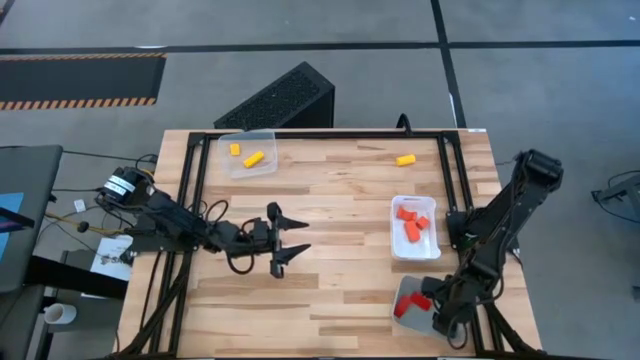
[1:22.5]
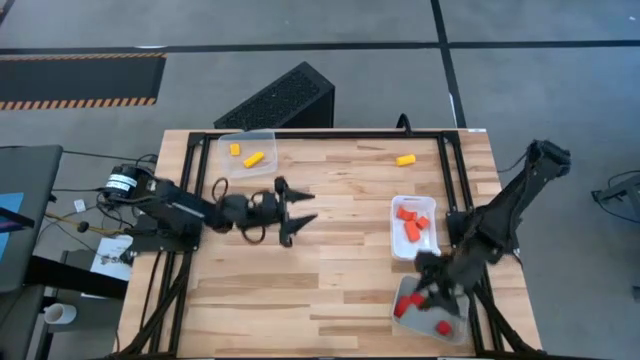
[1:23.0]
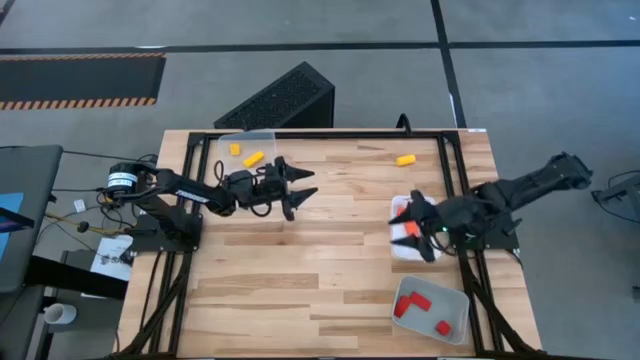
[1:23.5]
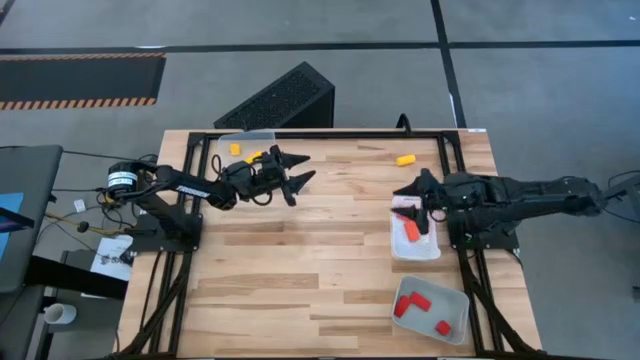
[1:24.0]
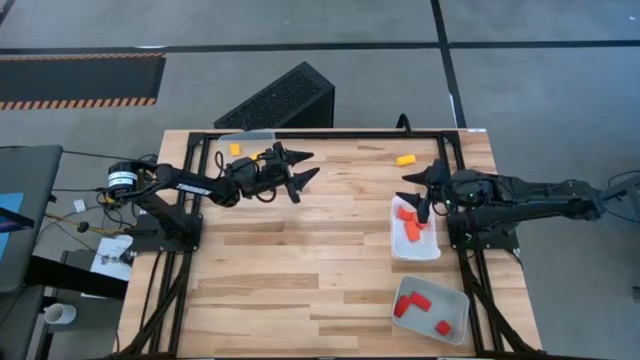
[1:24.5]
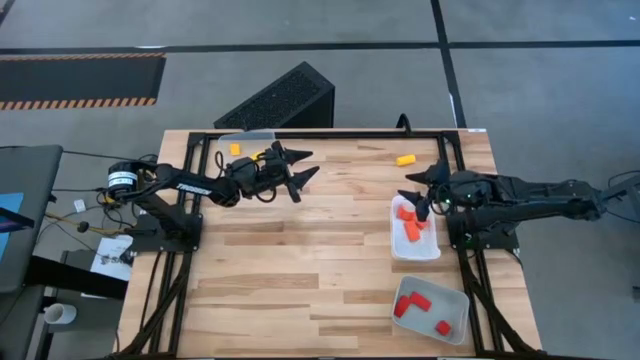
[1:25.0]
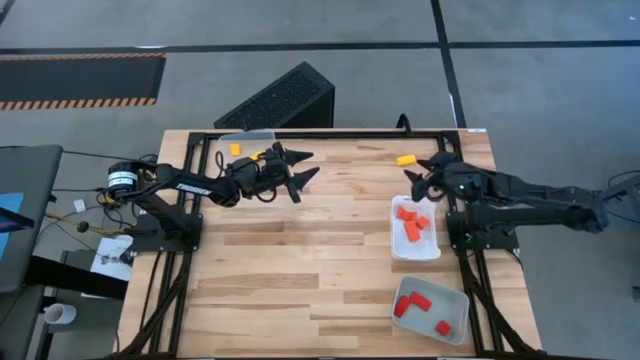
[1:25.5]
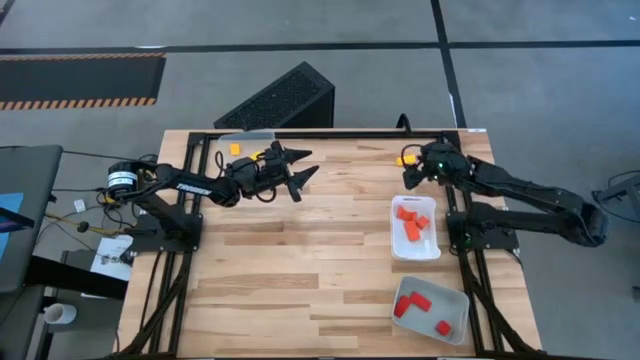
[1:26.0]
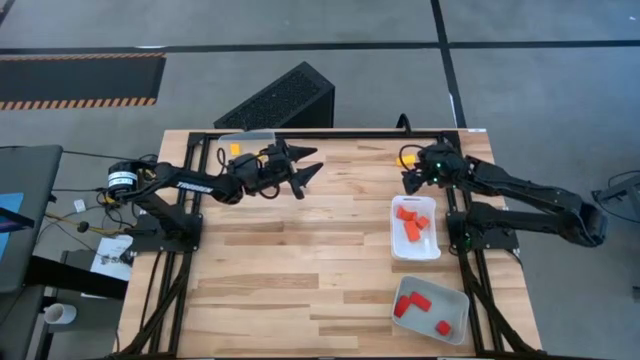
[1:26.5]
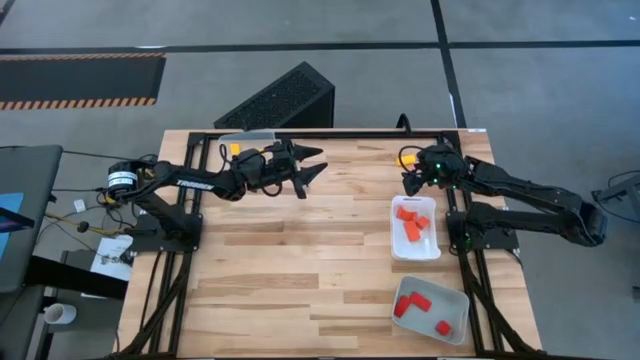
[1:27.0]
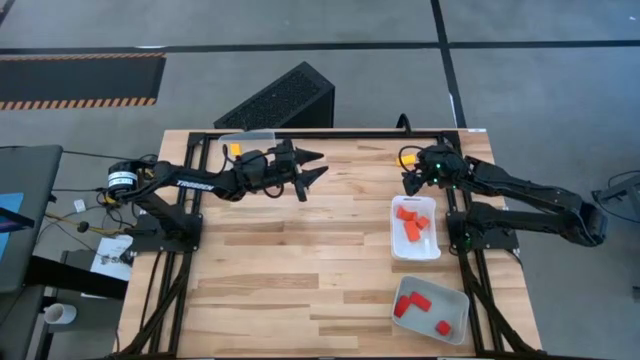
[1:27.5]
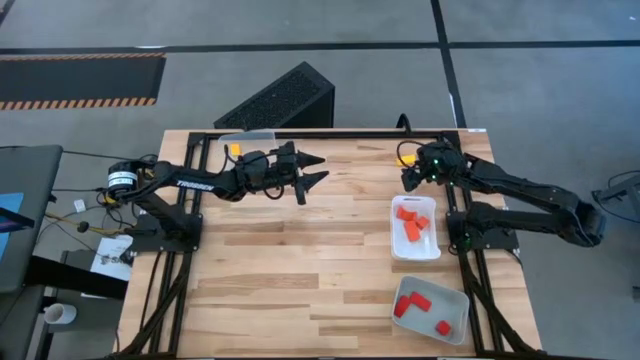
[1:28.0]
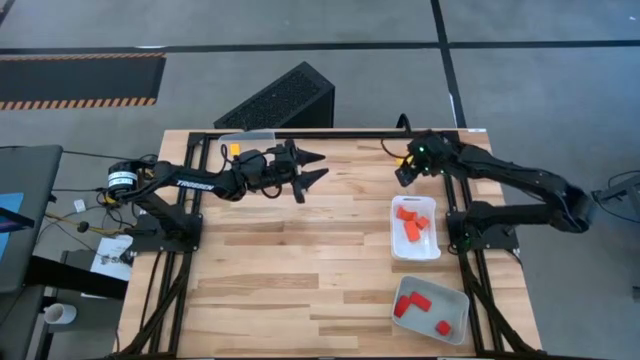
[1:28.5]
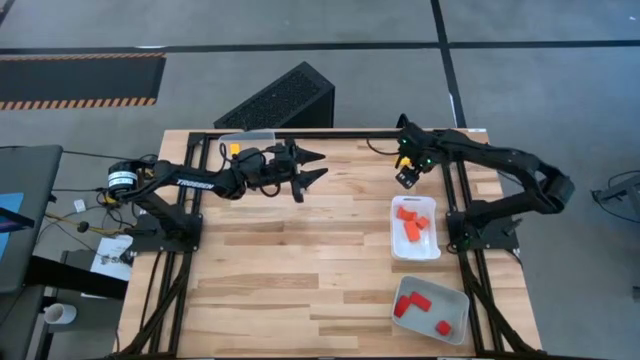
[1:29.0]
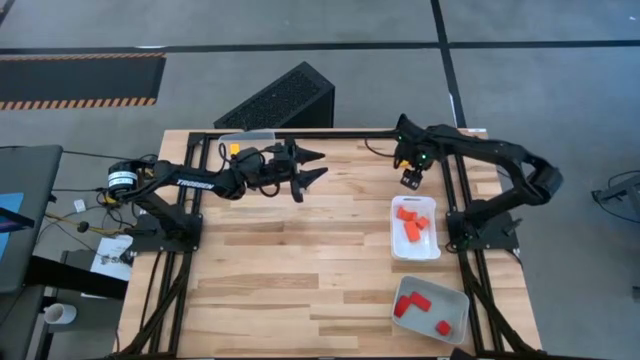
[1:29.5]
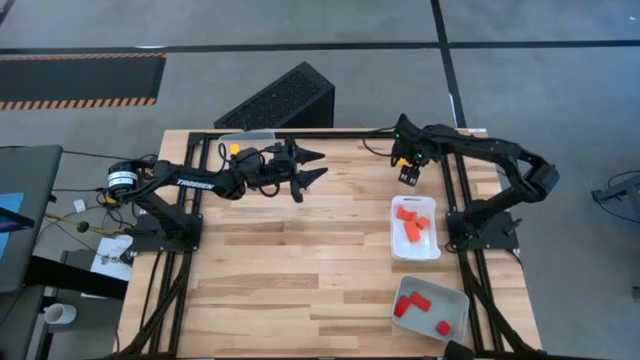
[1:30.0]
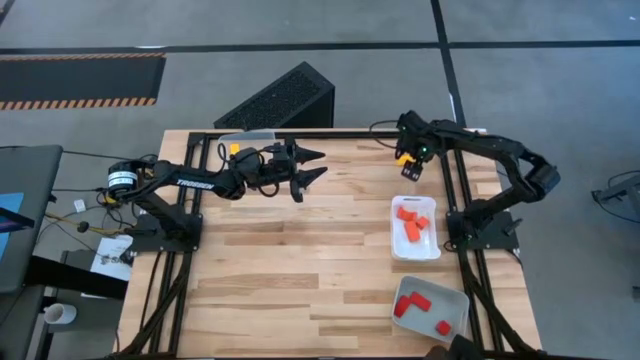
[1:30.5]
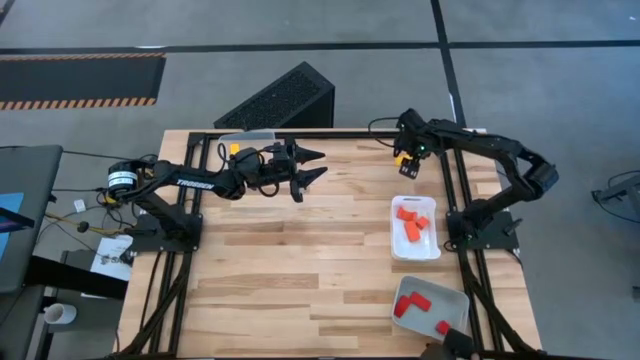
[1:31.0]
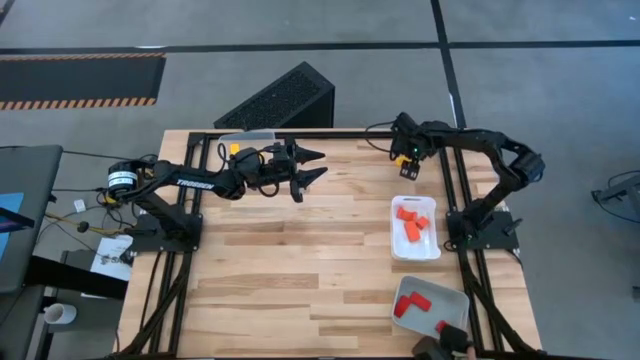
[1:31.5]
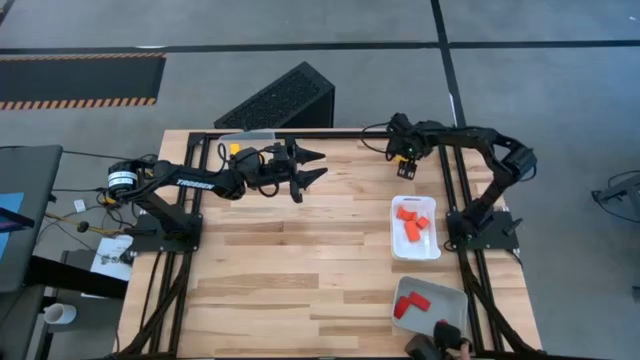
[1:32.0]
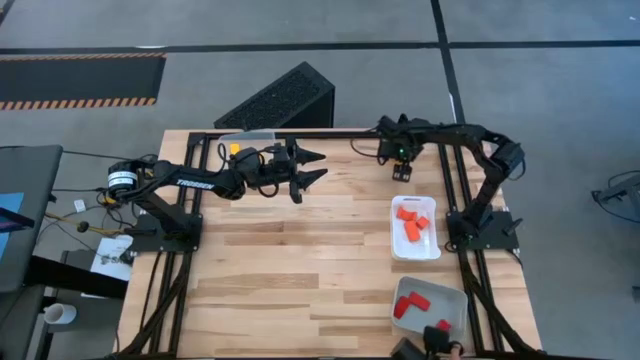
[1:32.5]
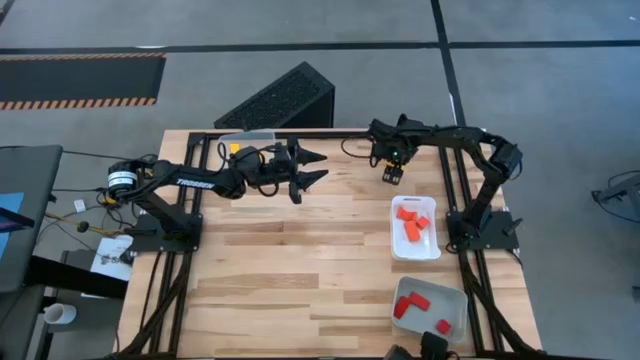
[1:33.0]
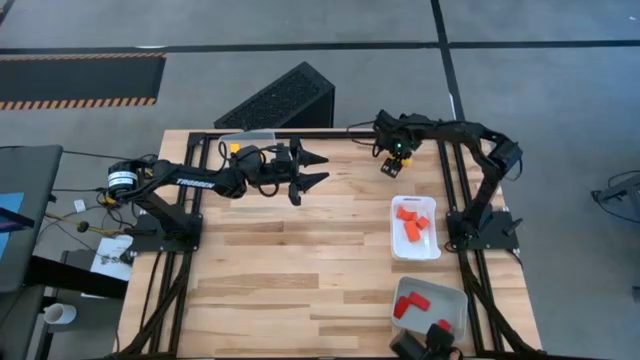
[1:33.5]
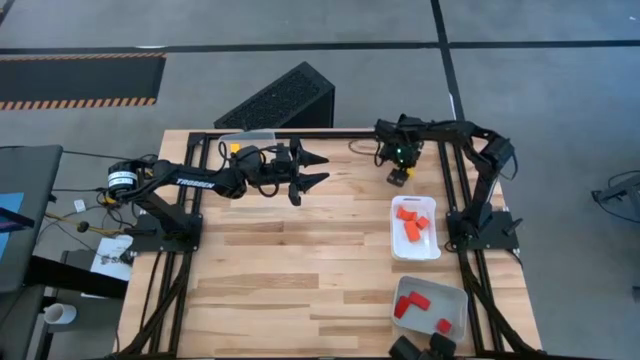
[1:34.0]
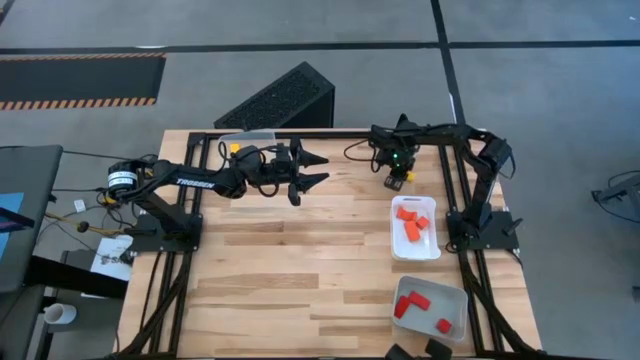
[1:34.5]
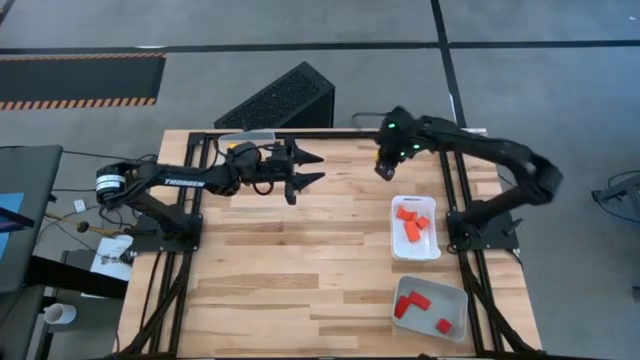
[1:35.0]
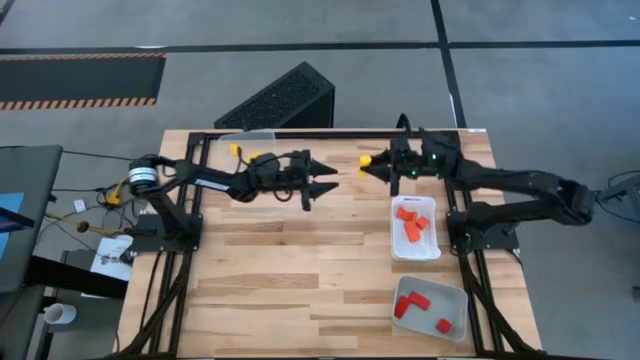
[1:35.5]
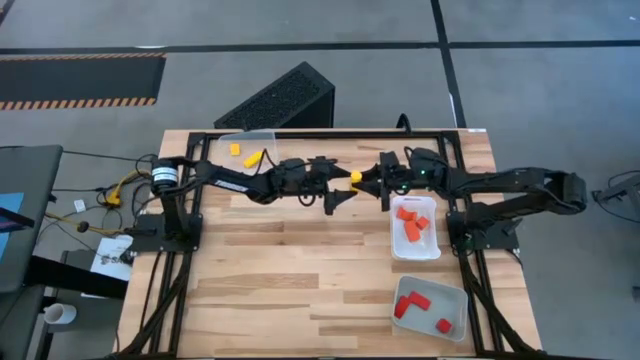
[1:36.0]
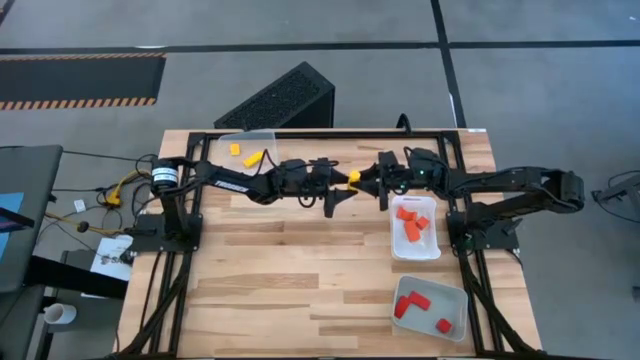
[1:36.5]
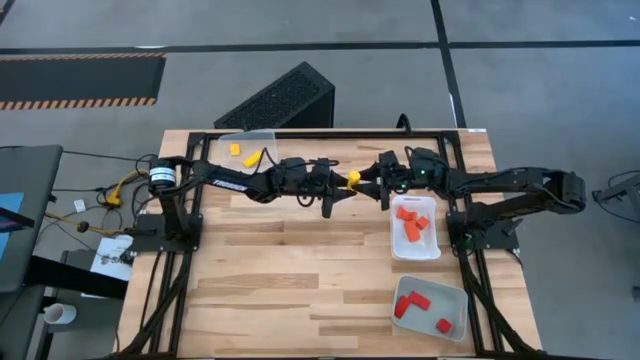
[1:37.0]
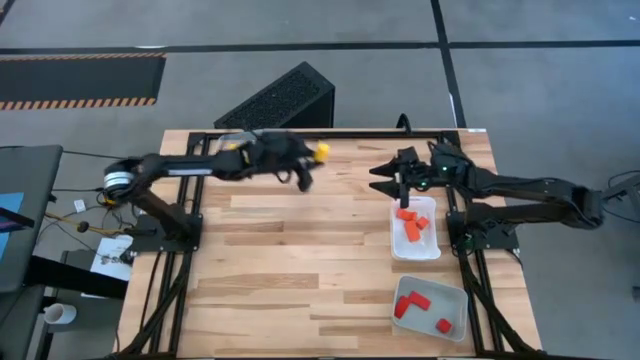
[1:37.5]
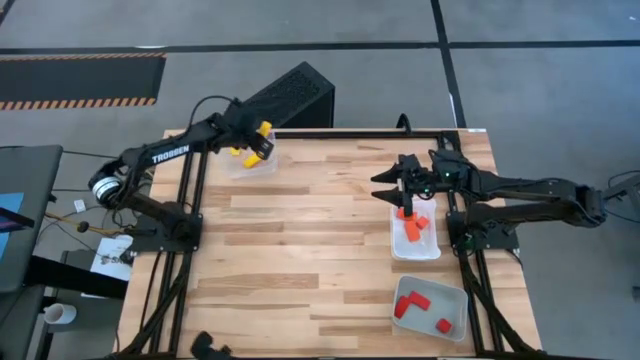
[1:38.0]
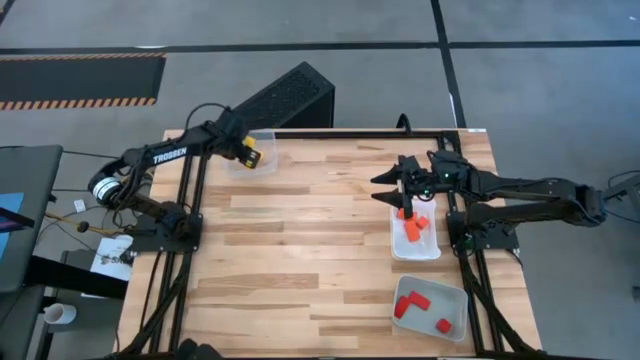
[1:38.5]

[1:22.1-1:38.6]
Task: Sort & place blocks by color
Put the yellow block into the transparent bin

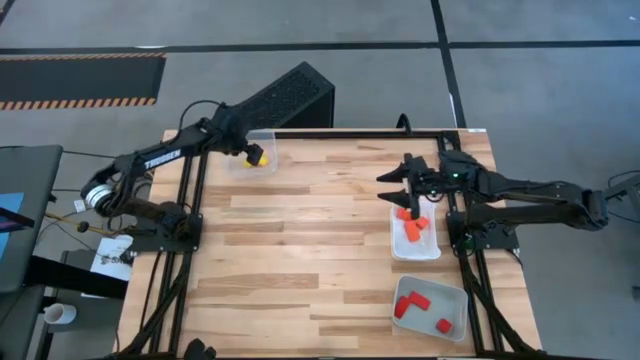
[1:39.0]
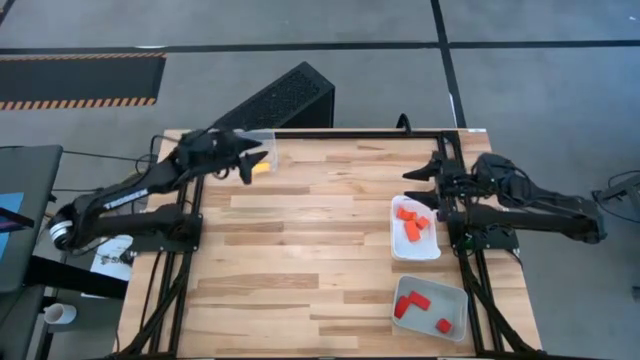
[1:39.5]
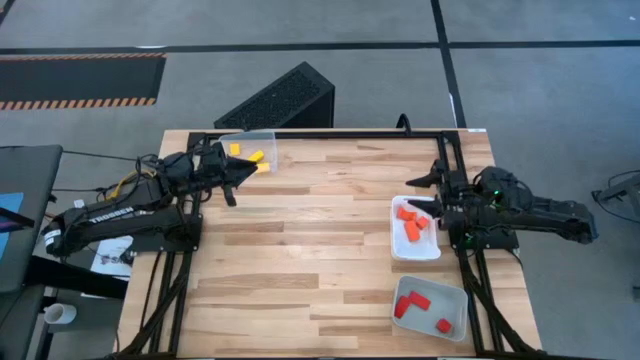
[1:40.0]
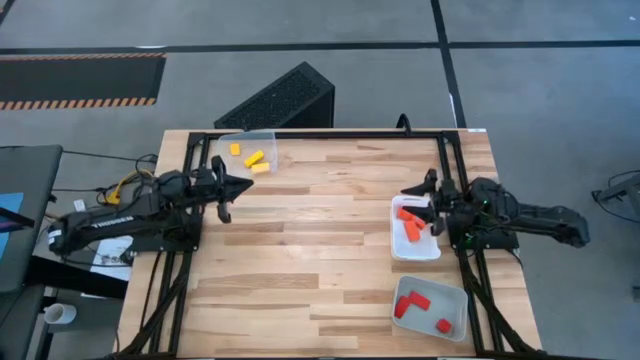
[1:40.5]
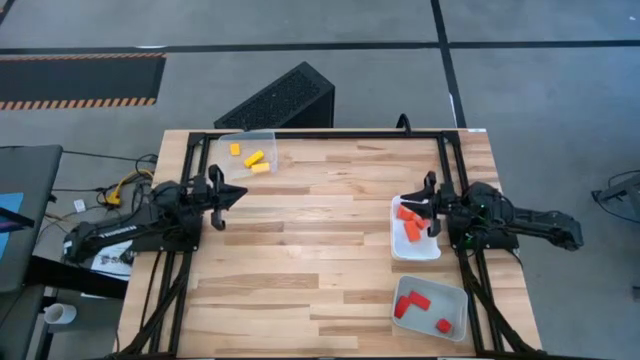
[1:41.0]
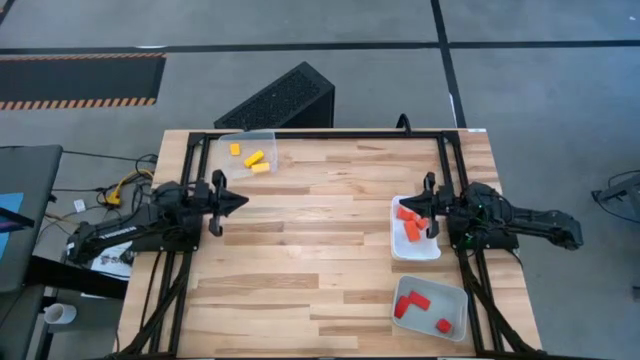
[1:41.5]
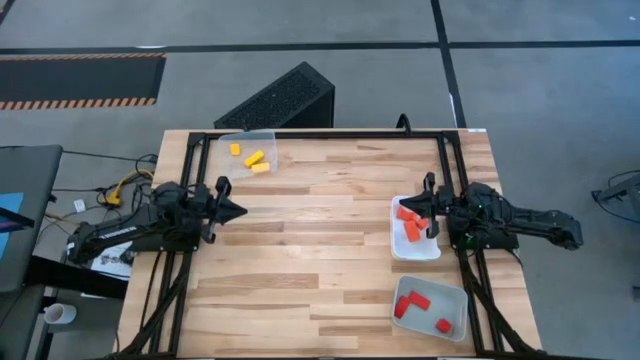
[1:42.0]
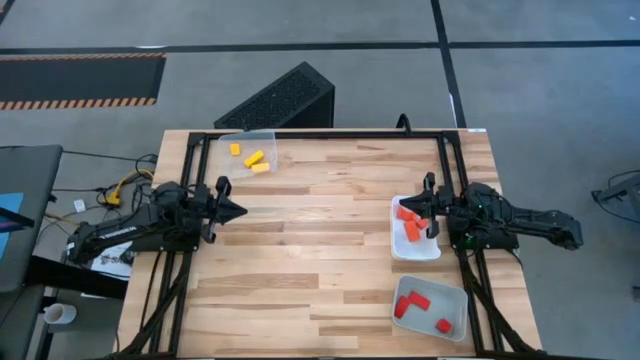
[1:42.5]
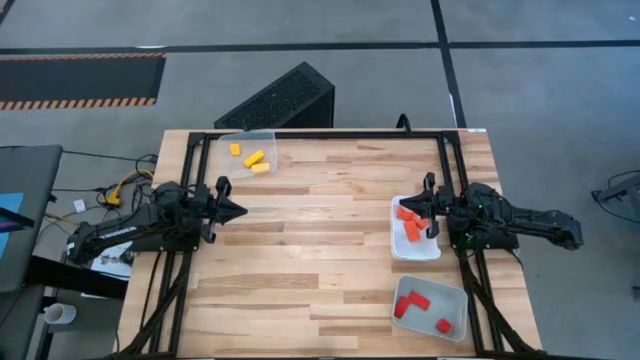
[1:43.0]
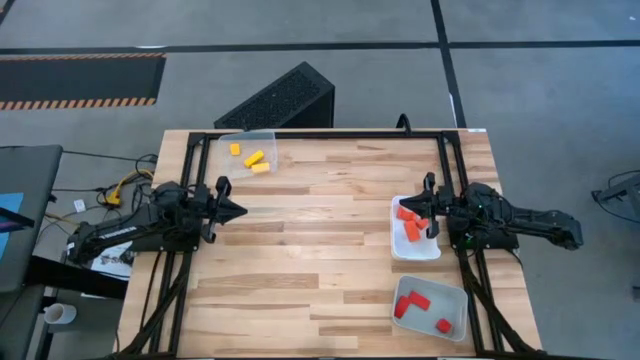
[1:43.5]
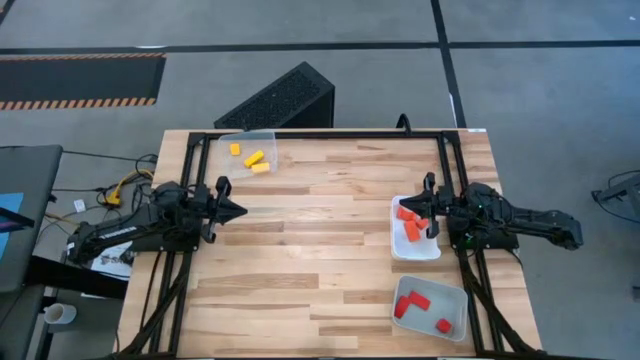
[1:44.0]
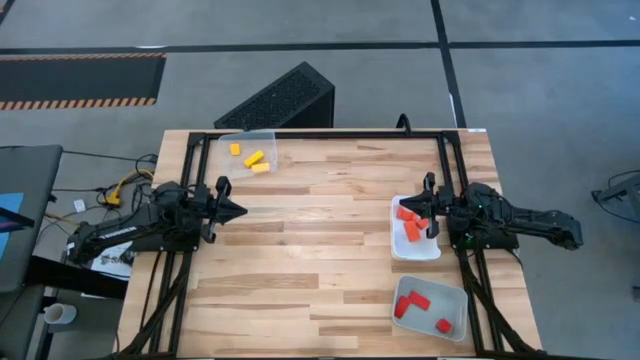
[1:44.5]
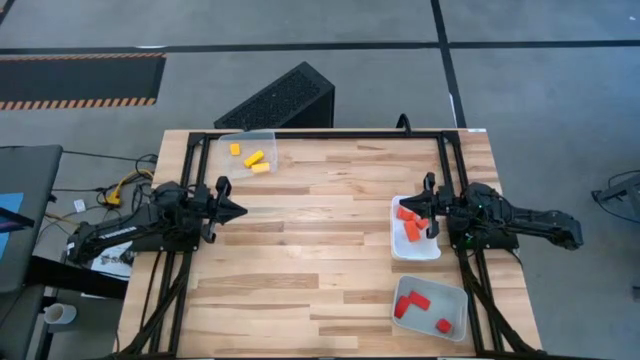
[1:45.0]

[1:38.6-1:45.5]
Return to Home Position
